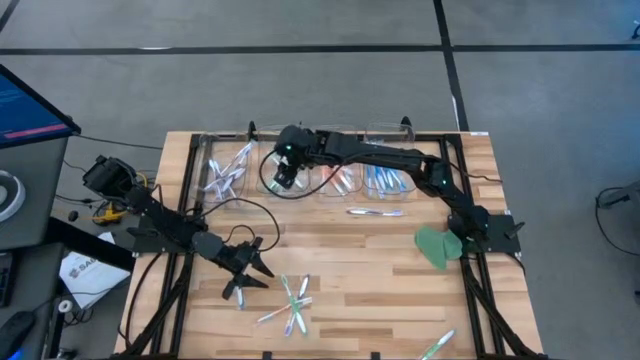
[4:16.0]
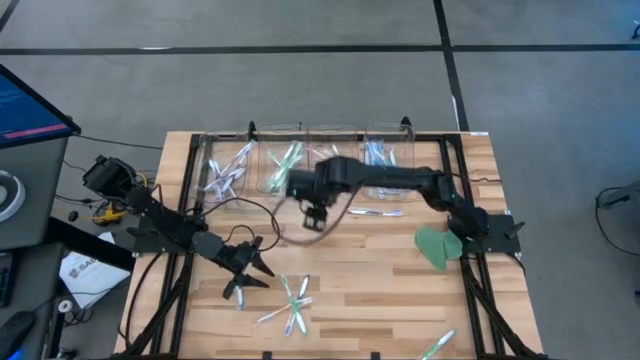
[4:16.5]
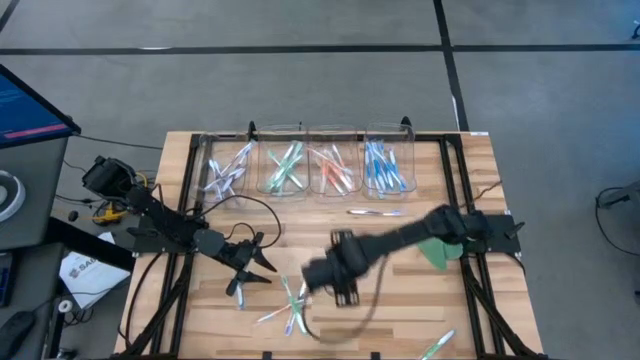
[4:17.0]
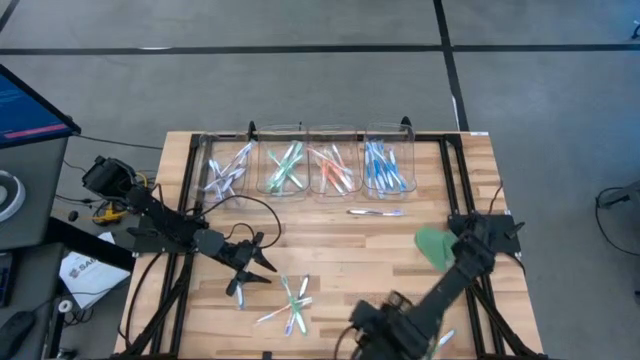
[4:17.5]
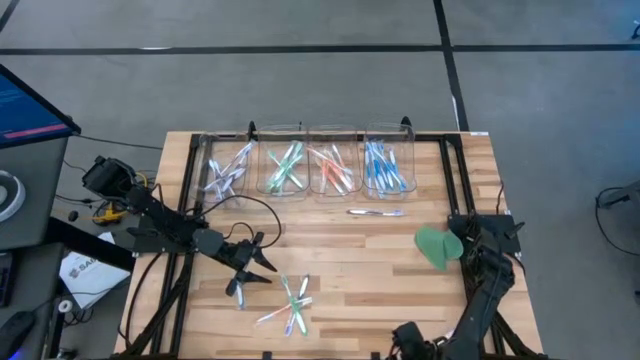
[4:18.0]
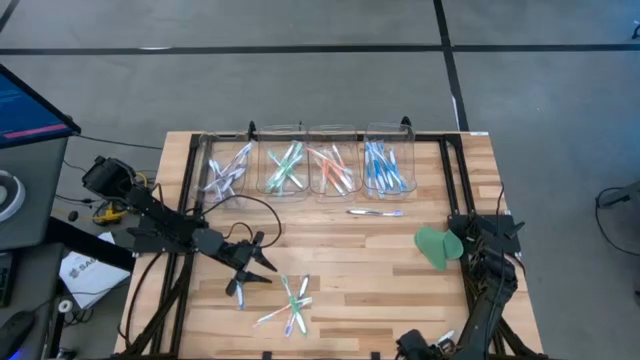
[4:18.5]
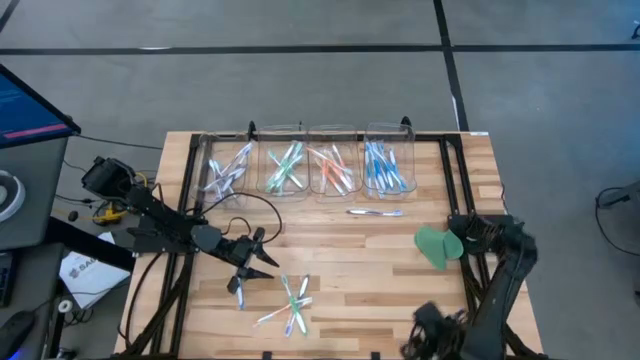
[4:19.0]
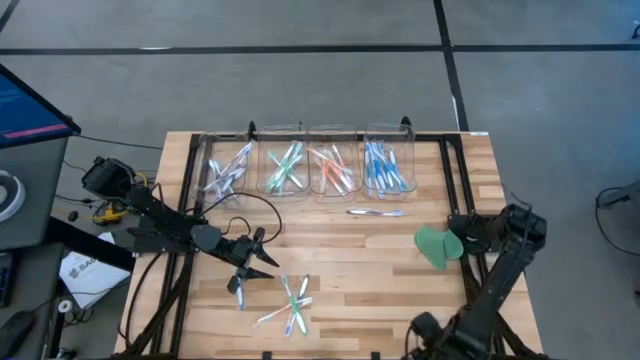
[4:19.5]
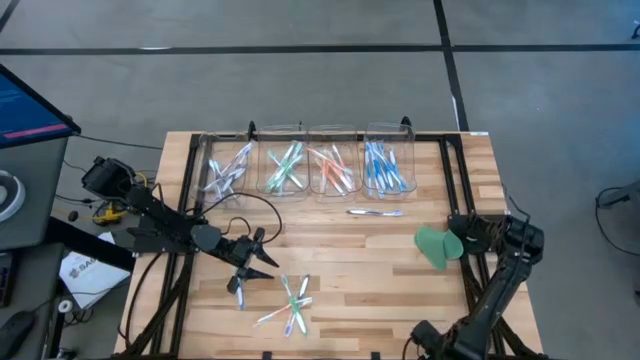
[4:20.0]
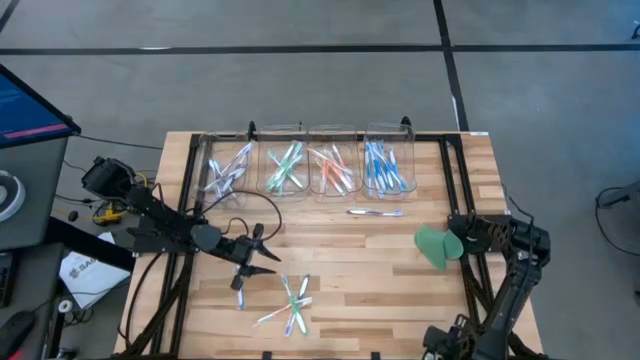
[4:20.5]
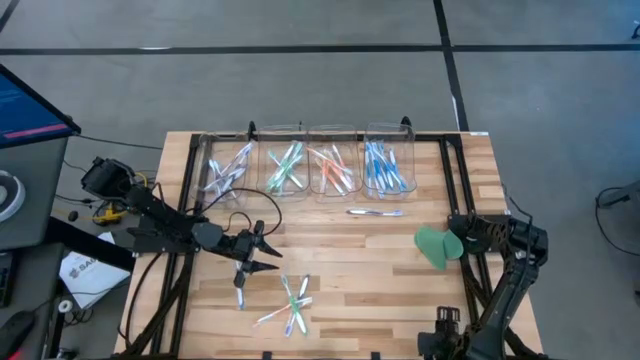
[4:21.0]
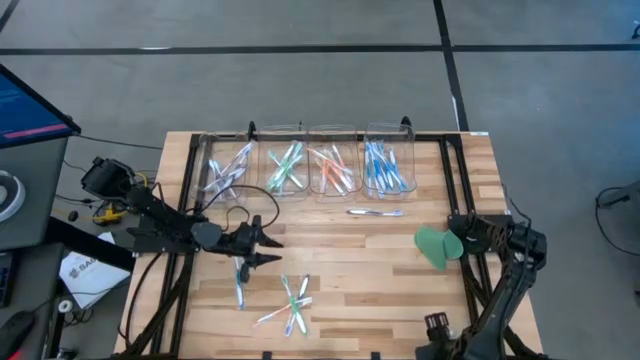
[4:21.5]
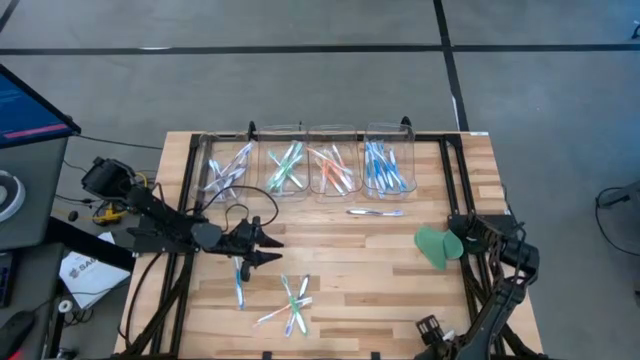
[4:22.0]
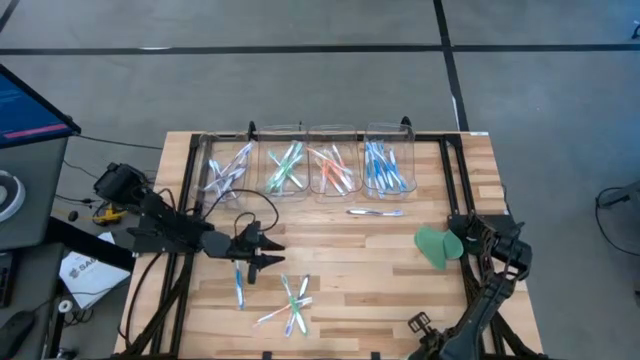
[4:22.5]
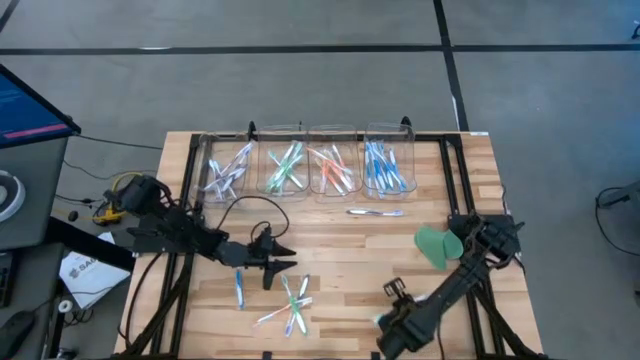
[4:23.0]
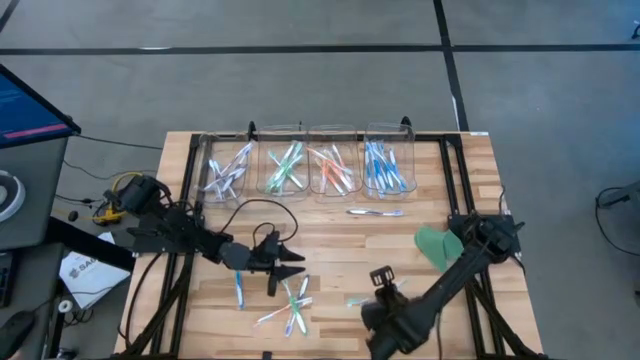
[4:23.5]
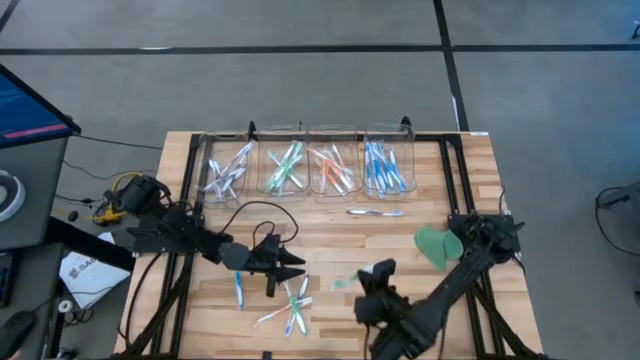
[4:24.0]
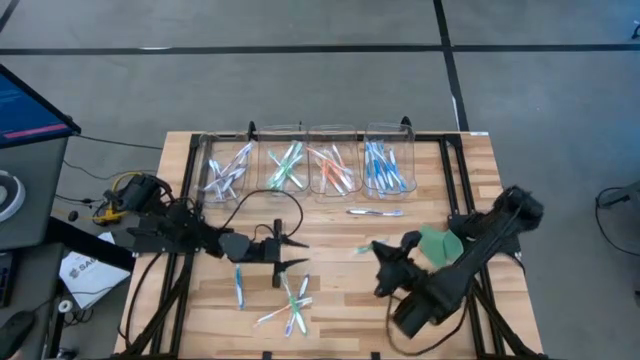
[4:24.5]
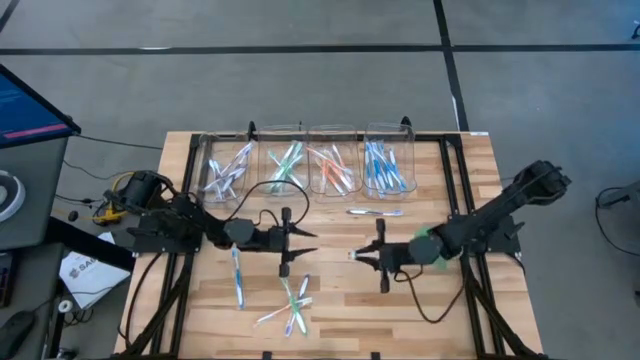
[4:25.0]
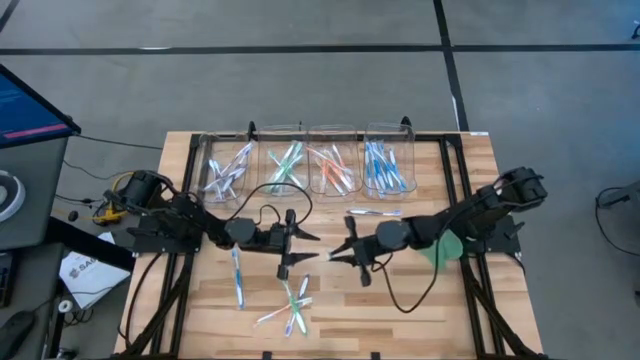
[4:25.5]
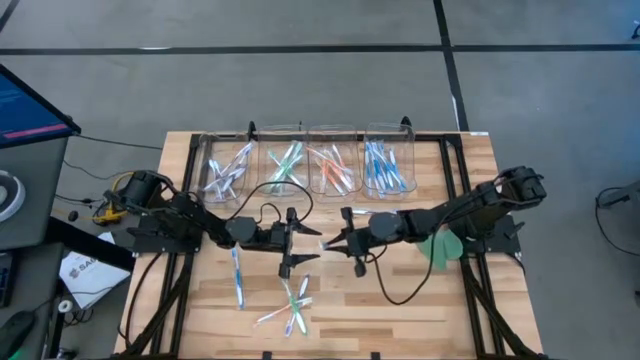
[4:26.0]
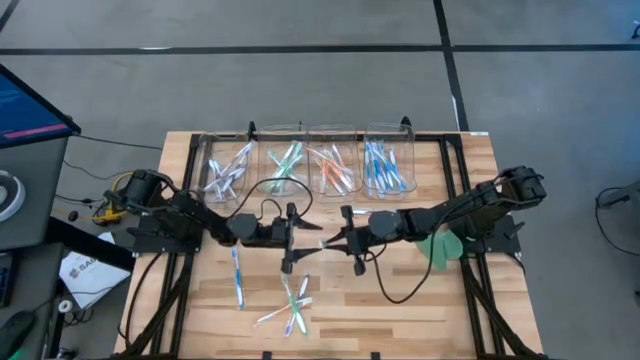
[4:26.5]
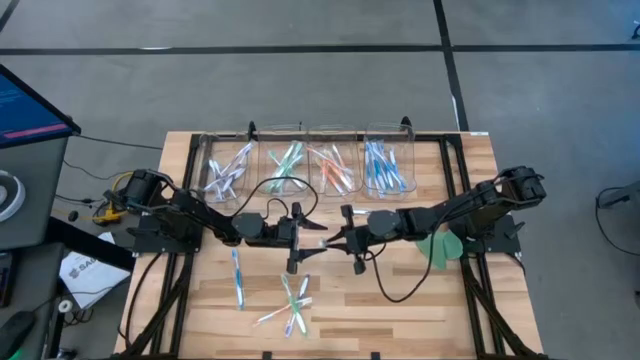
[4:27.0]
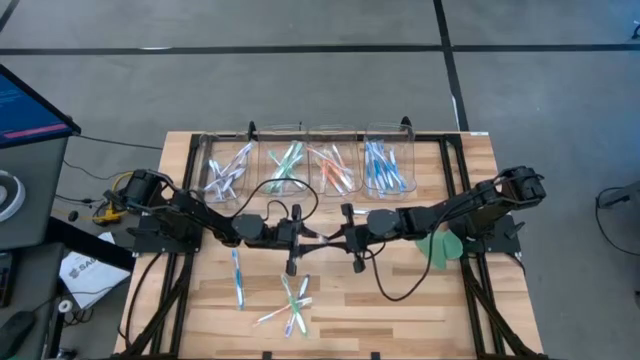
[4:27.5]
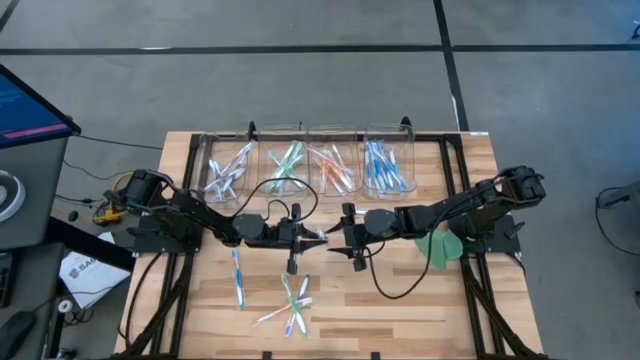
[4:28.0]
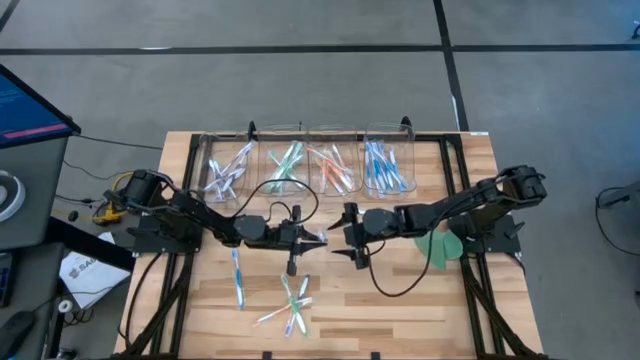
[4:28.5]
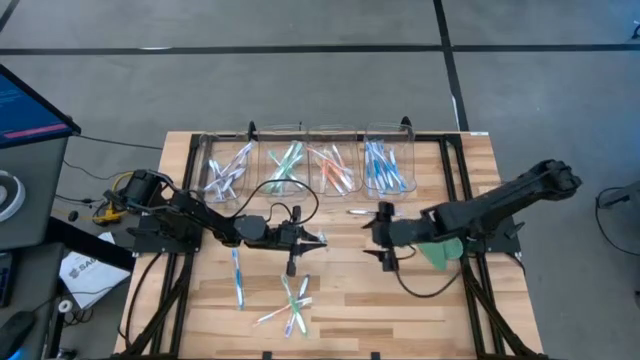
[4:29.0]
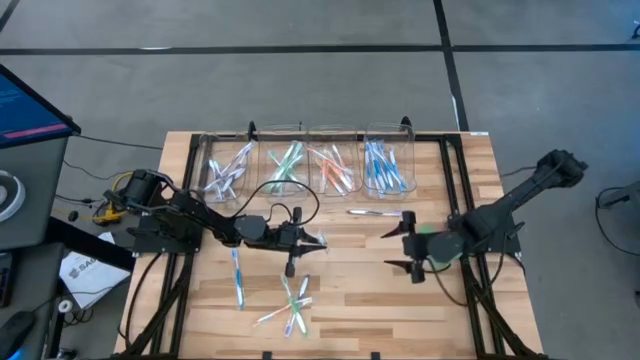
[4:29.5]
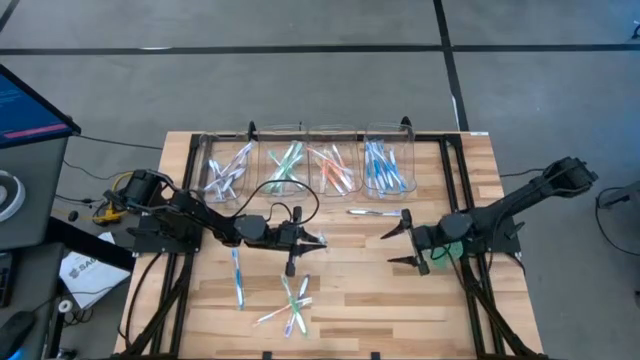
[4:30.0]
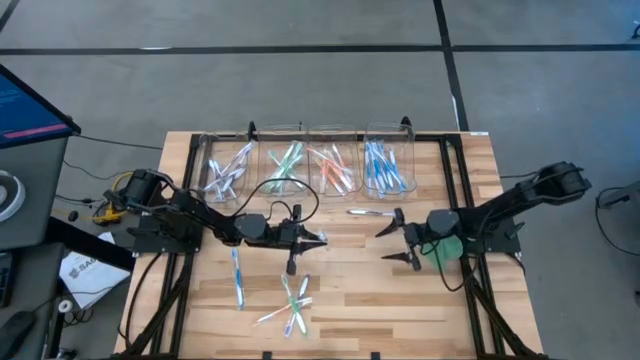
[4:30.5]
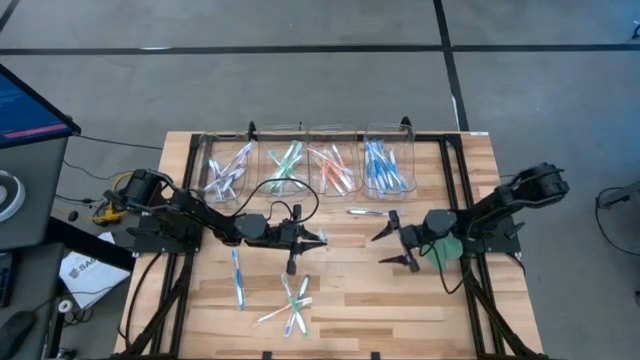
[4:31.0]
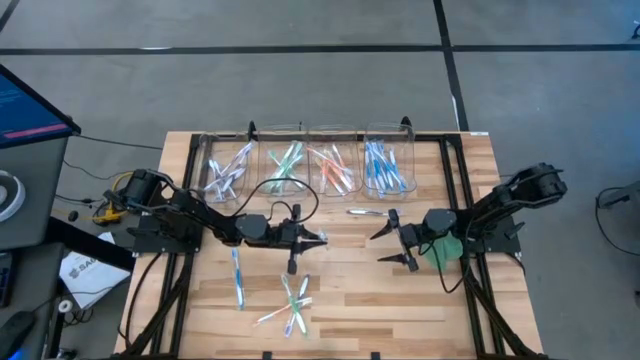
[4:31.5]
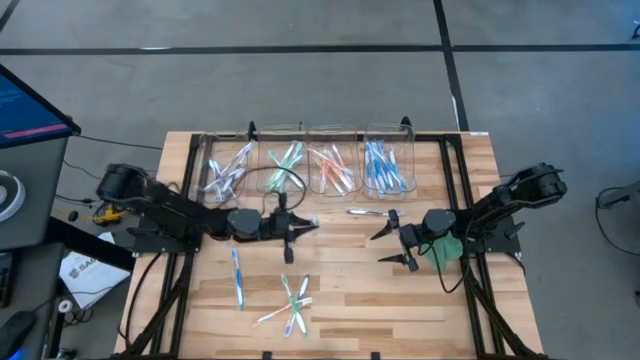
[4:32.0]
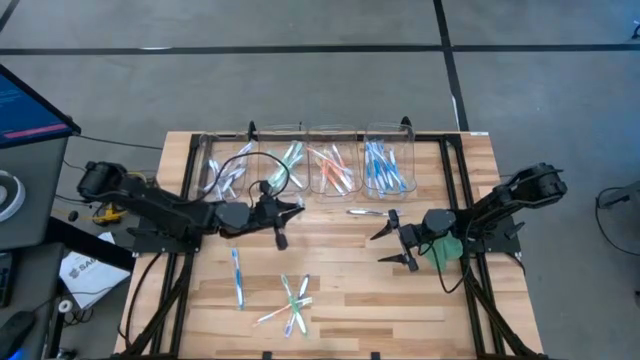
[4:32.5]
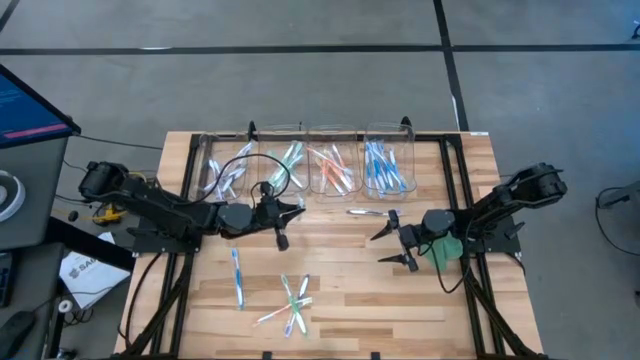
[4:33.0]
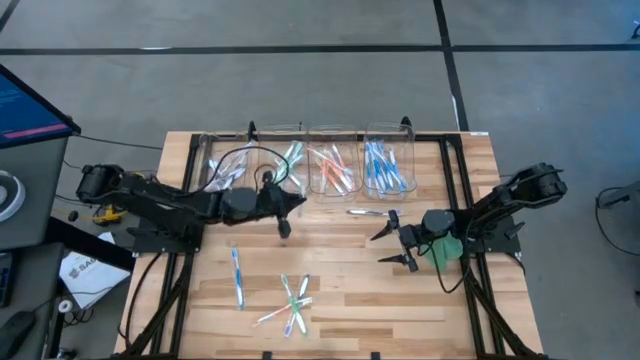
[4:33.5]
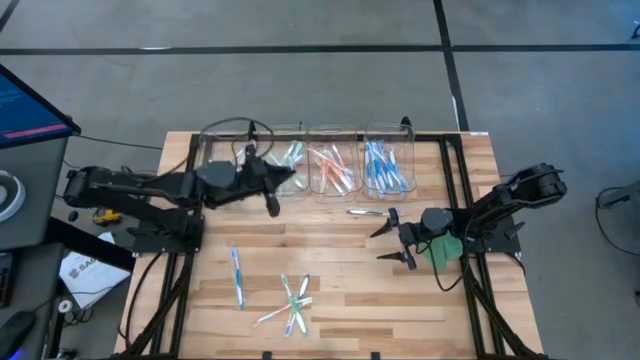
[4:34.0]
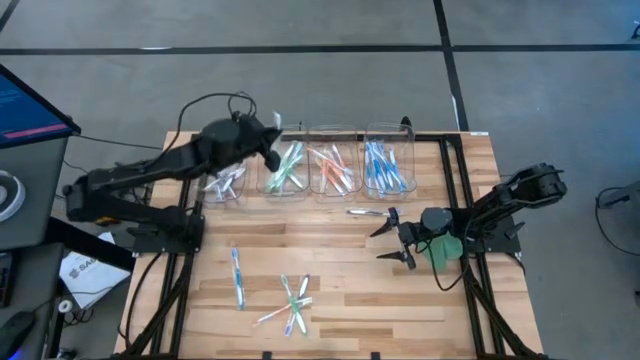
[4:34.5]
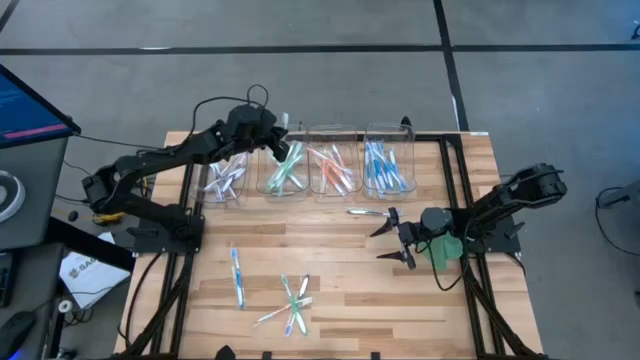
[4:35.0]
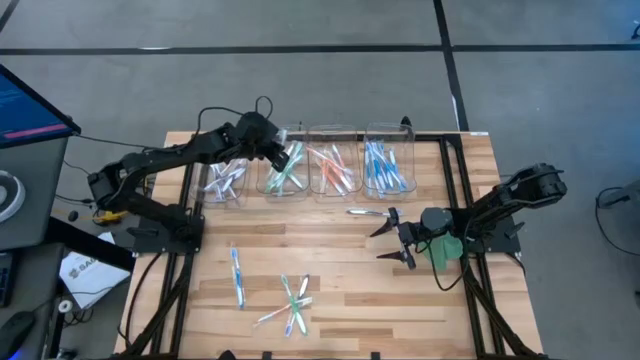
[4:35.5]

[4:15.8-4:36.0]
Task: Pick & Place Toothbrushes
Put the green toothbrush into the middle left transparent bin

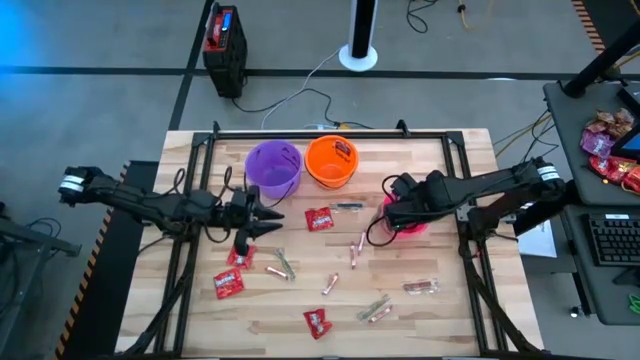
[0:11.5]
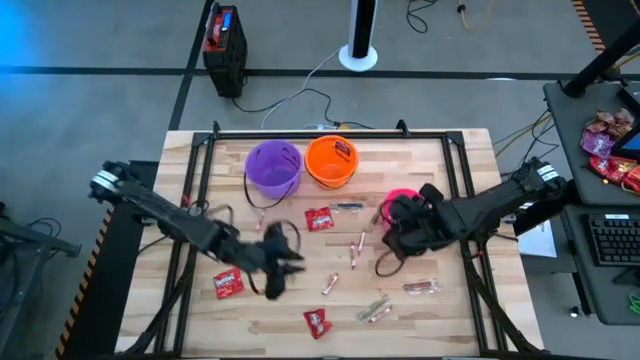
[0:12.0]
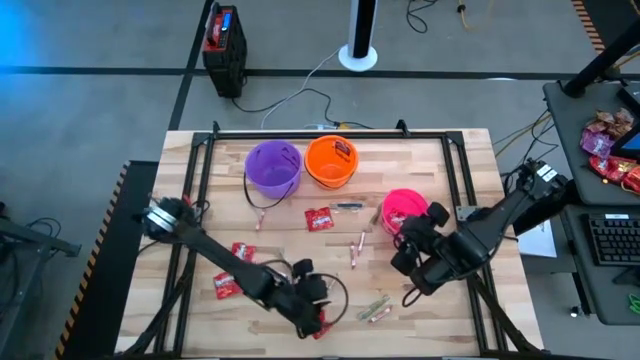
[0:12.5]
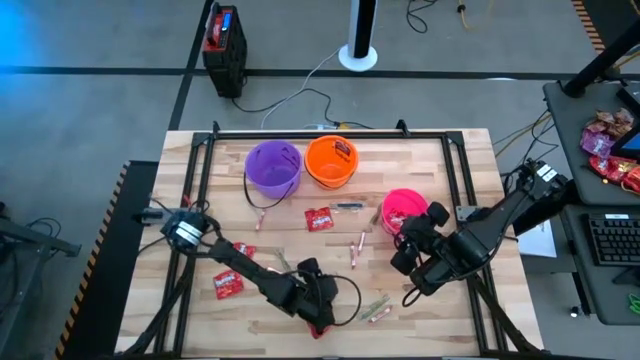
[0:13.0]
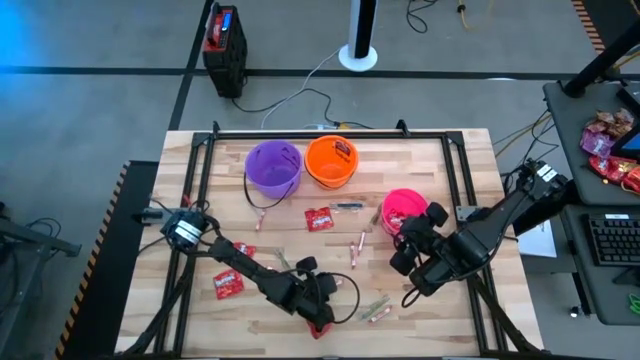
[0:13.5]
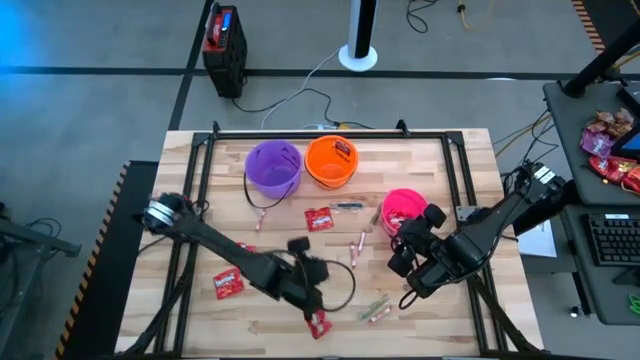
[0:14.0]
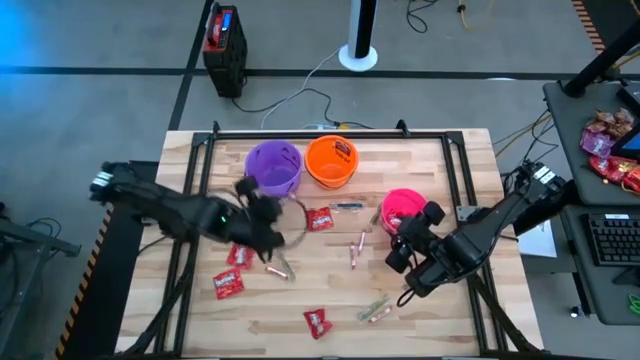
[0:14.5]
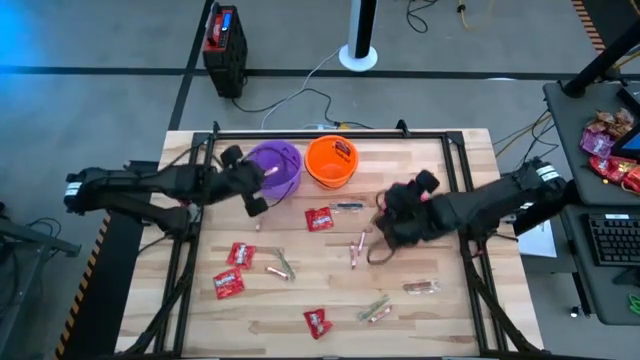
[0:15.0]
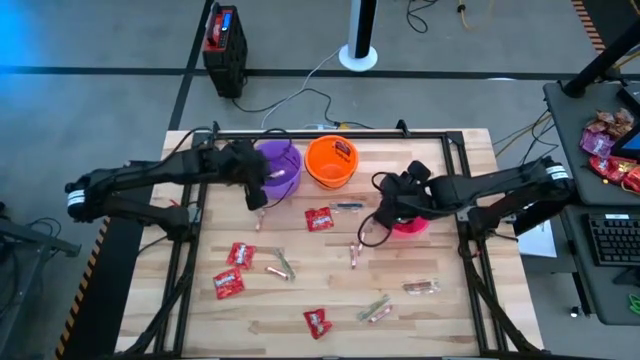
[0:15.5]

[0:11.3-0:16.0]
Task: Sort candy by brand, put in halloween buckets
Put the white candy into the violet bucket
